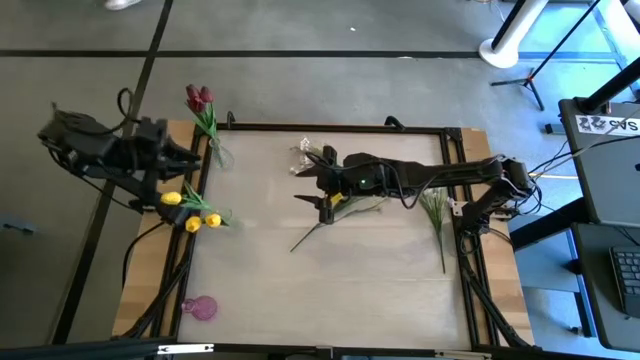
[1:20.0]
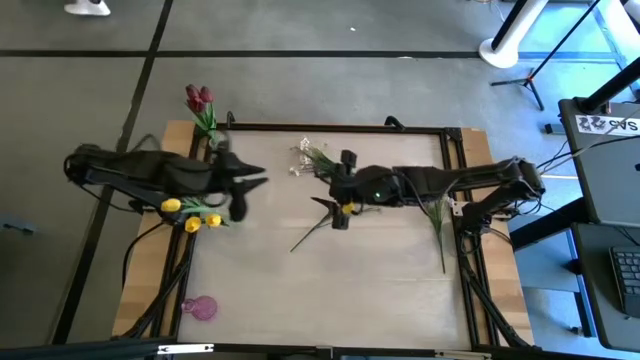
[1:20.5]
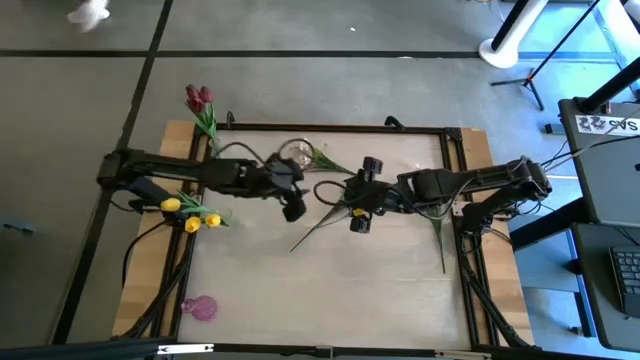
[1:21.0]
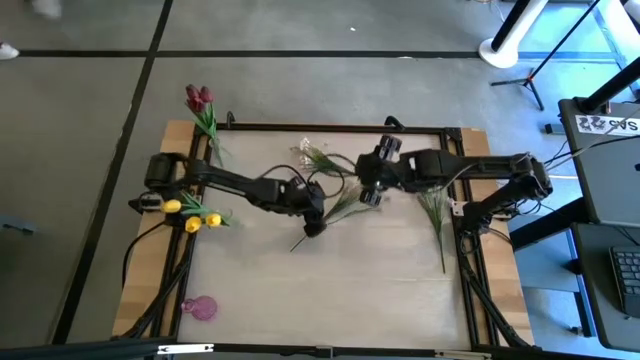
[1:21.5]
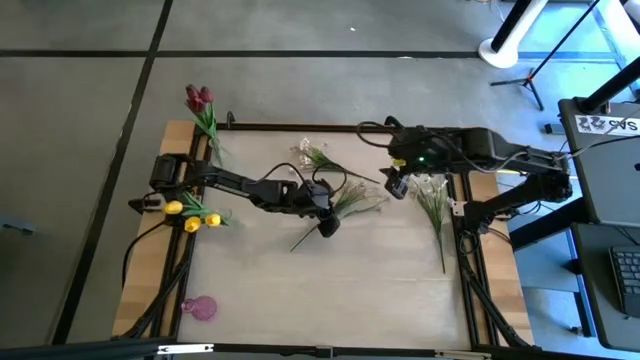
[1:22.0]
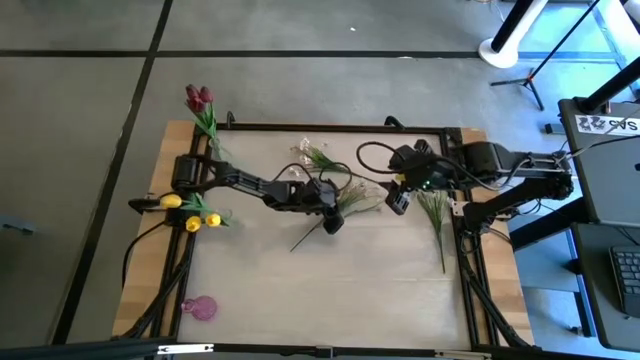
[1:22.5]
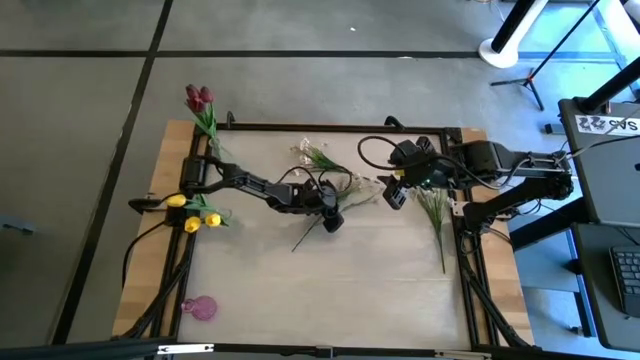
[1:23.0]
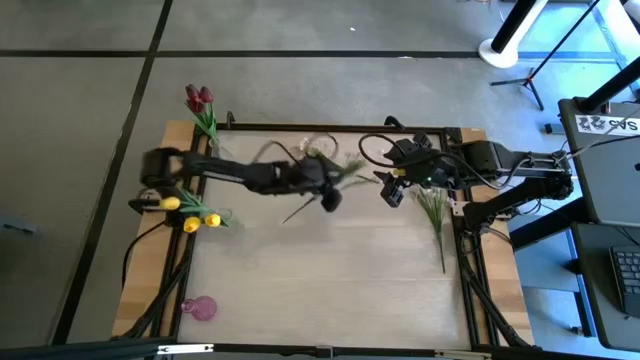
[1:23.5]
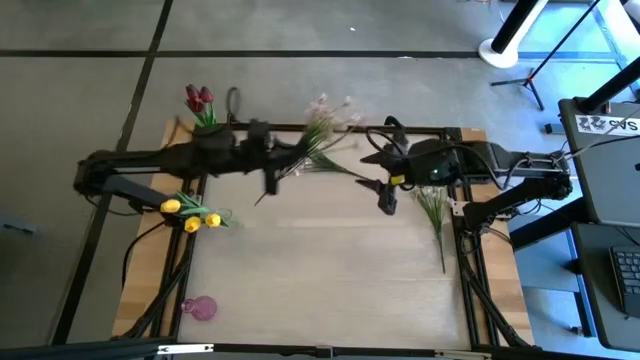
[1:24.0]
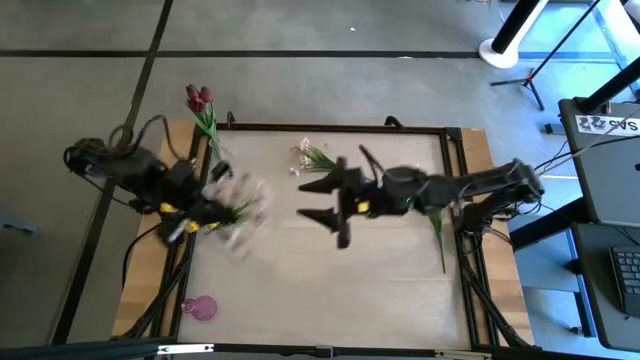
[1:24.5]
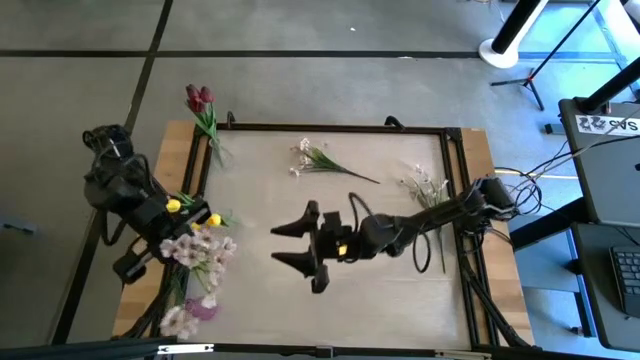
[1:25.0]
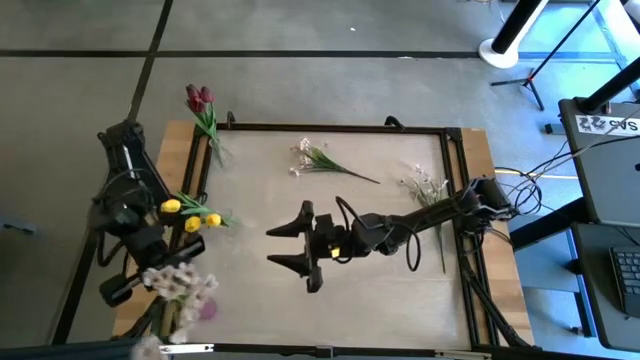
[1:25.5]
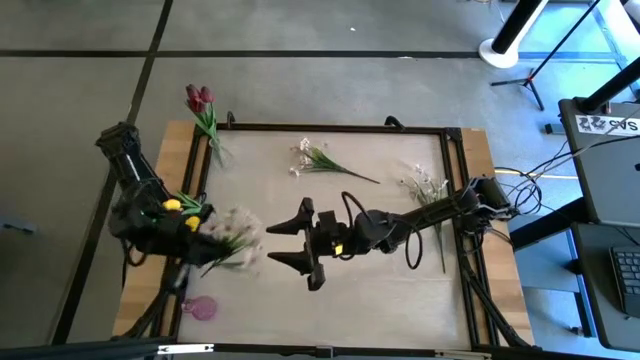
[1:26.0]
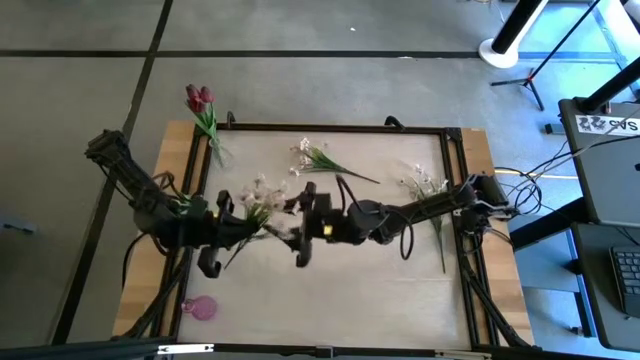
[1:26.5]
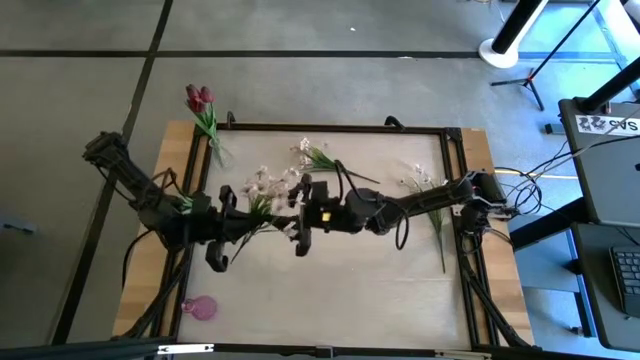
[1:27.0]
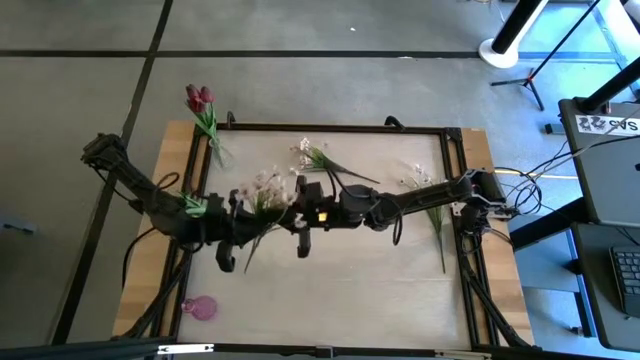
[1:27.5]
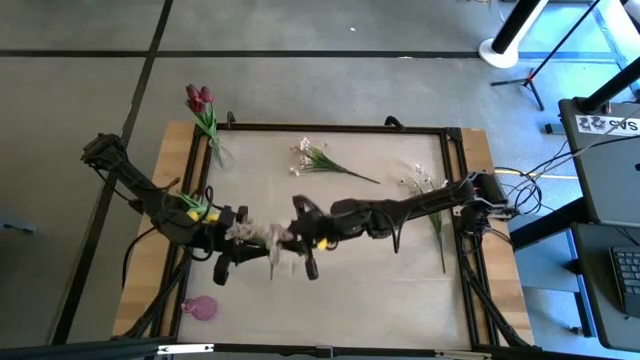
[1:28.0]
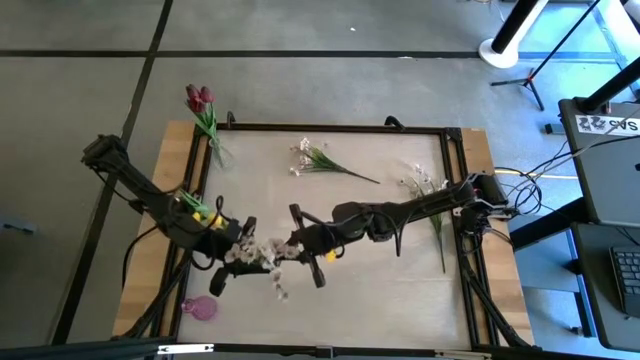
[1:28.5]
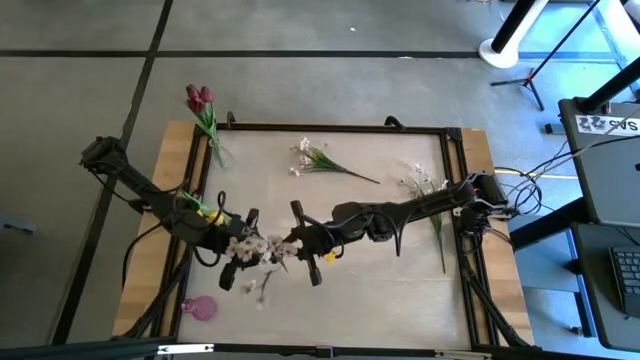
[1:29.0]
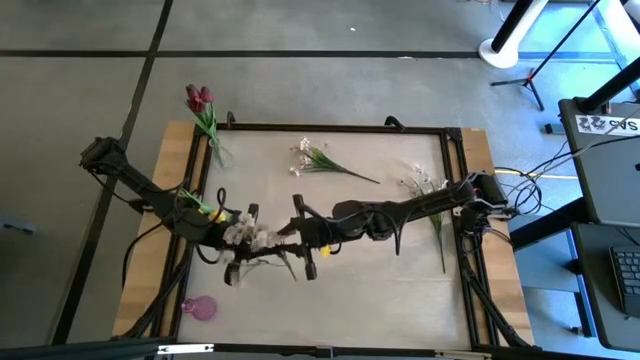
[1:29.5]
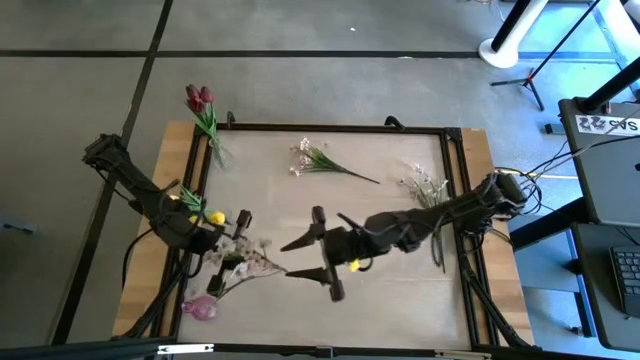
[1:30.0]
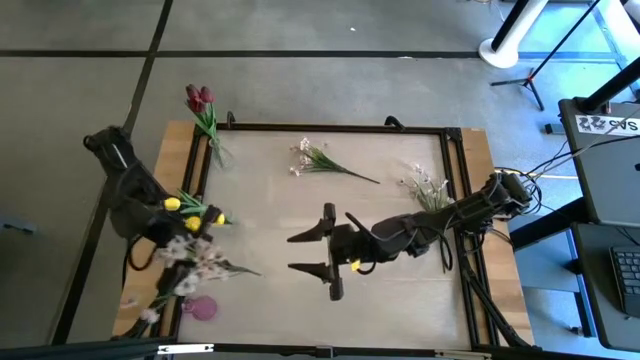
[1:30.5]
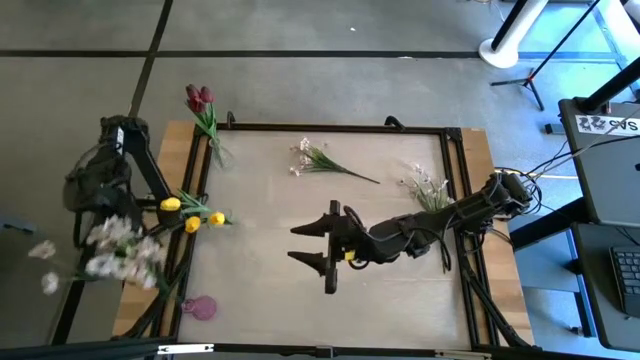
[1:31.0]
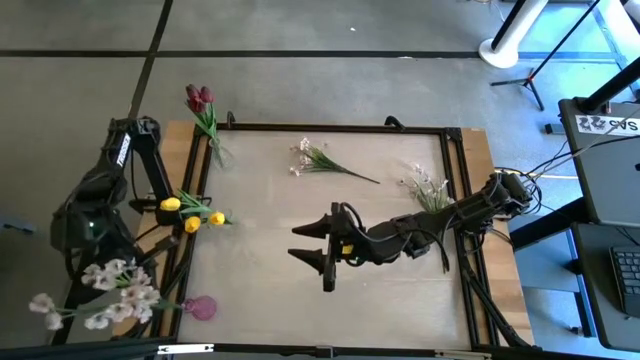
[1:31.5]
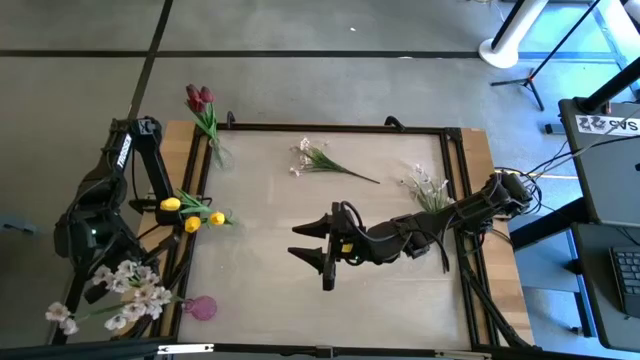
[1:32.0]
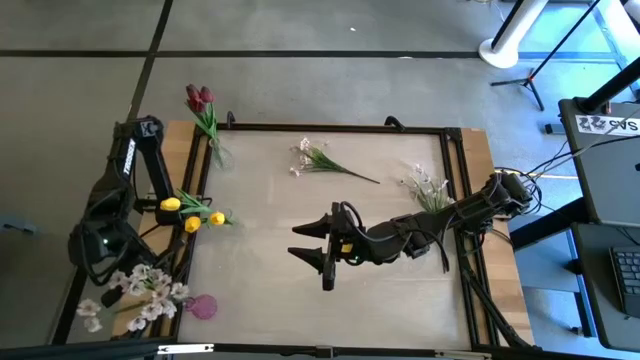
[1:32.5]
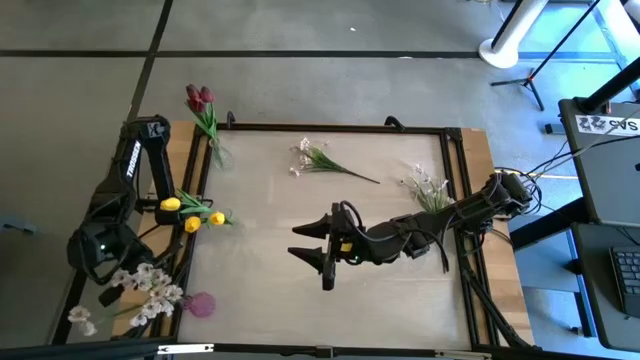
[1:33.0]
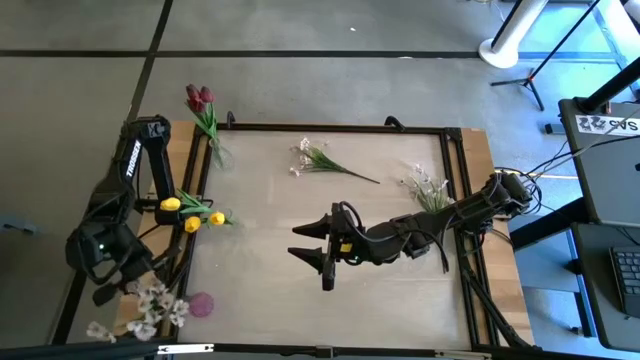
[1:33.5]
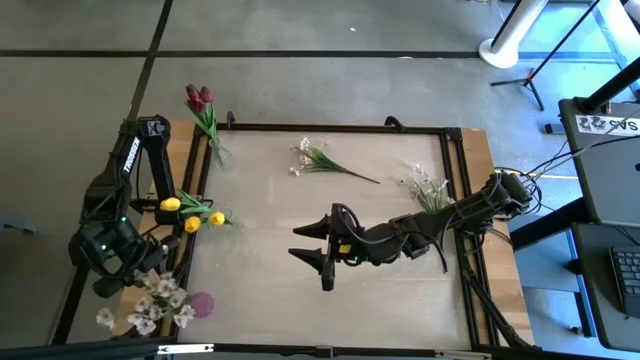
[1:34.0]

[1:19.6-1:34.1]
Task: Sort flowers into vase by color
Put the bottom left white flowers into the purple vase

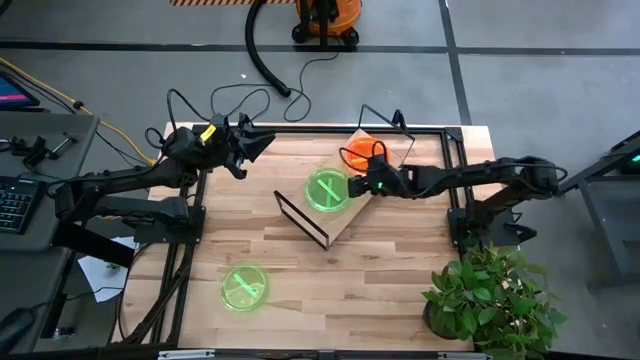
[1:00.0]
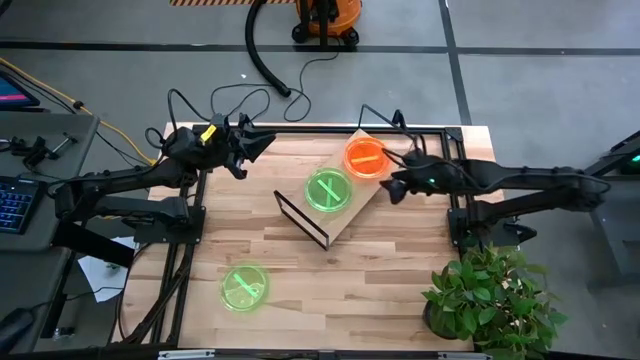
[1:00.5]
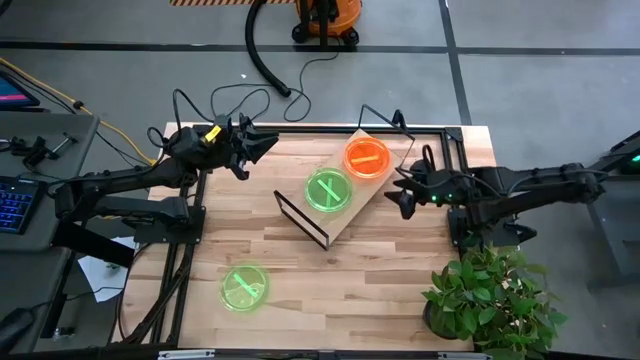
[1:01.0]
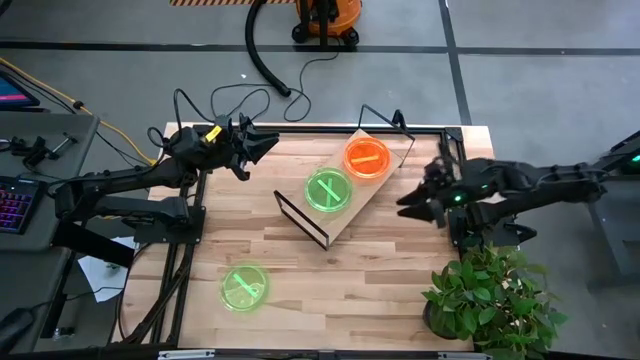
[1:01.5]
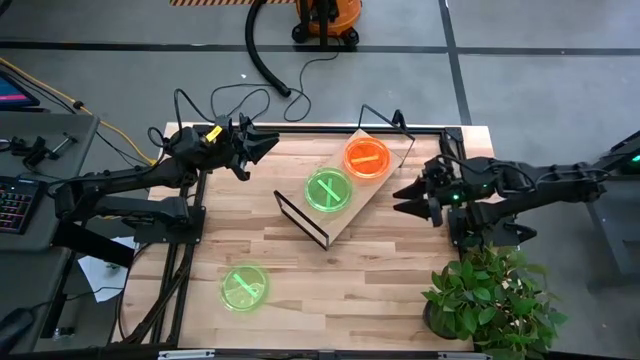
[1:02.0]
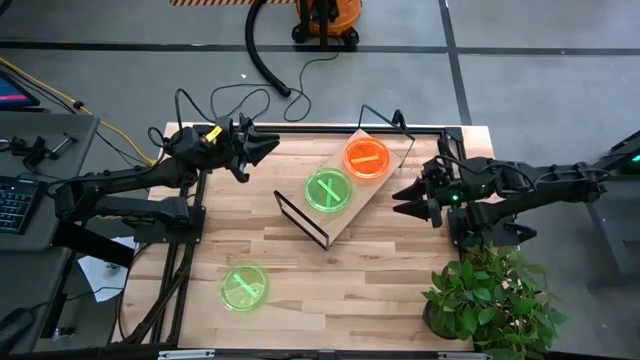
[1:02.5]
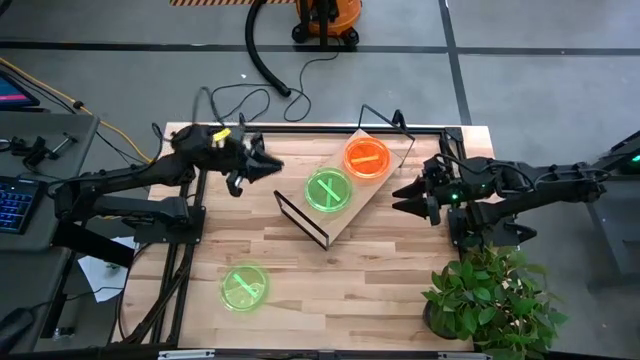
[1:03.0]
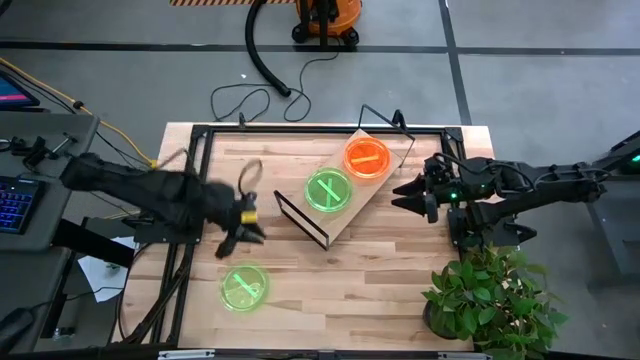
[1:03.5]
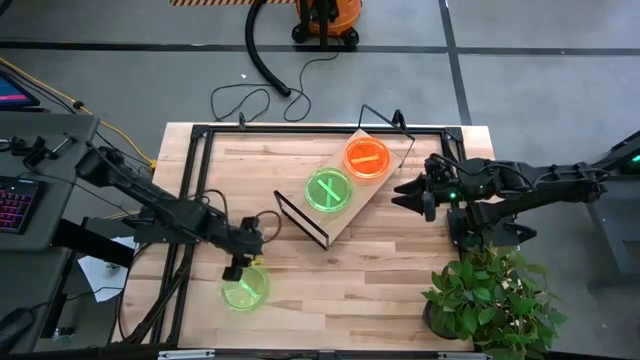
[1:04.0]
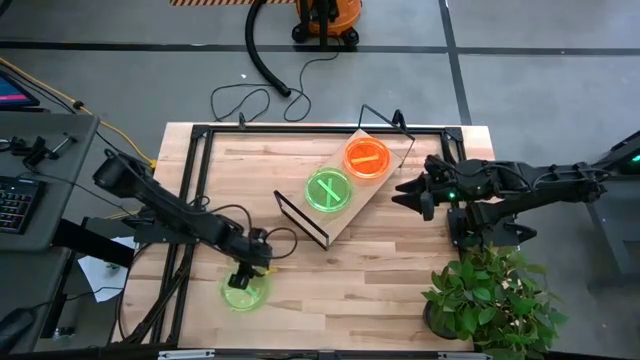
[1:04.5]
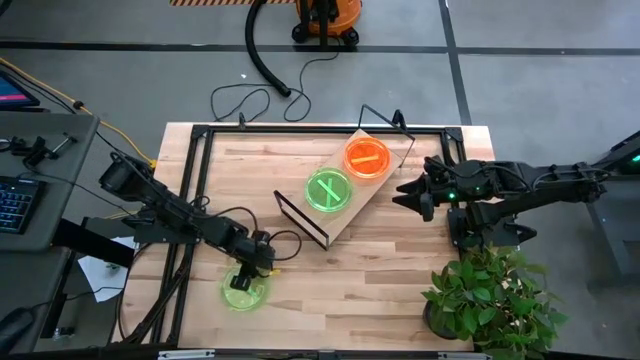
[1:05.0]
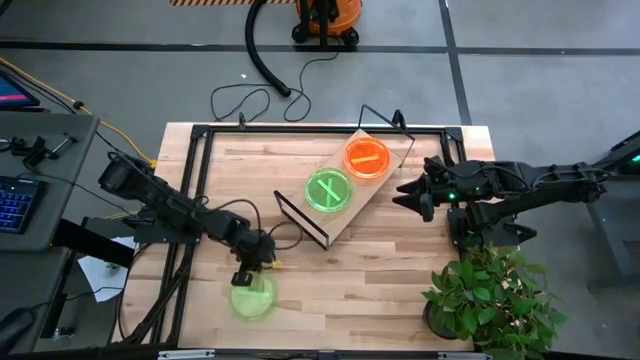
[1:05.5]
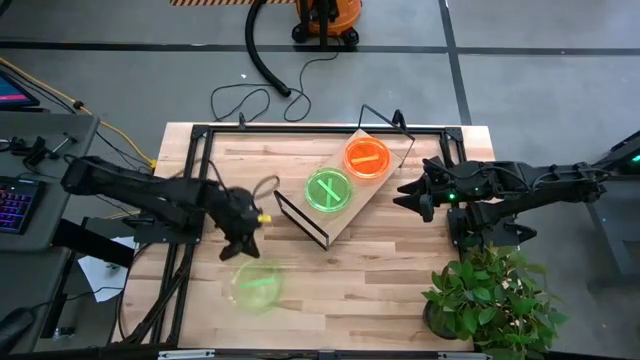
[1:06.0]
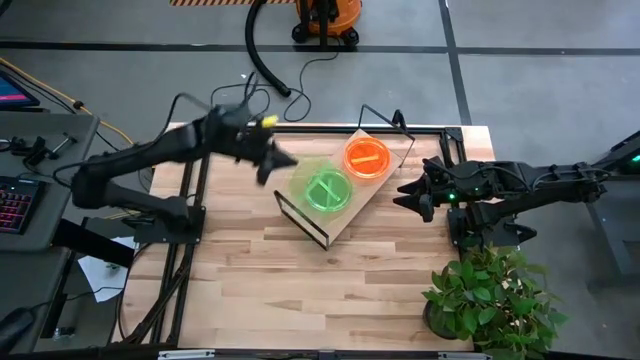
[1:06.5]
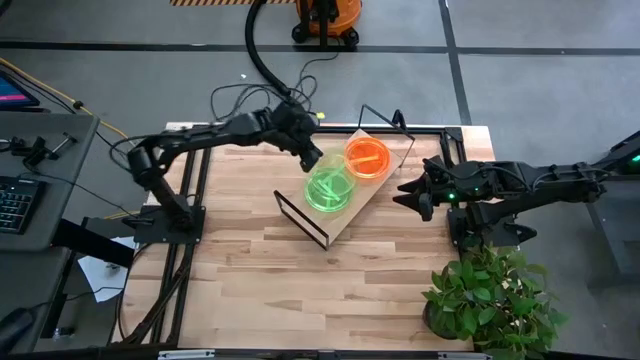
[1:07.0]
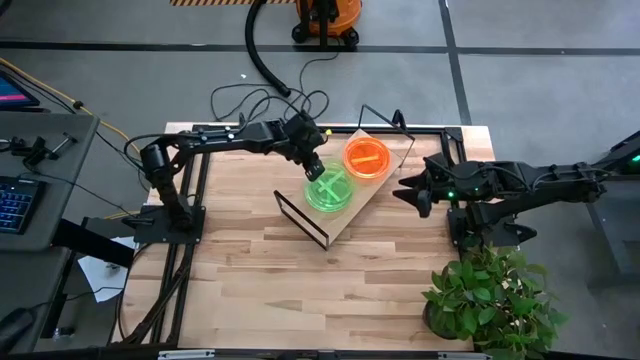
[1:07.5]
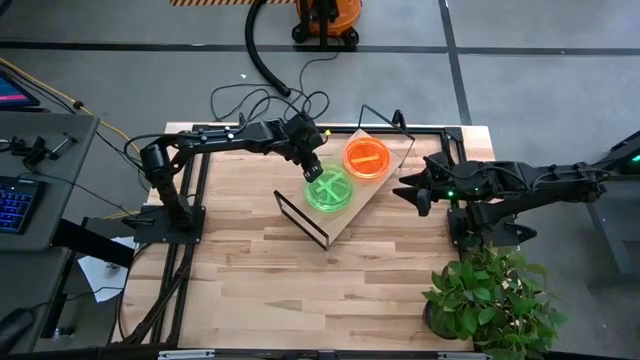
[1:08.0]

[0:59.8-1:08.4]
Task: Place and stack plates onto a shelf
Stack the green plate on top of the green plates on the shelf
